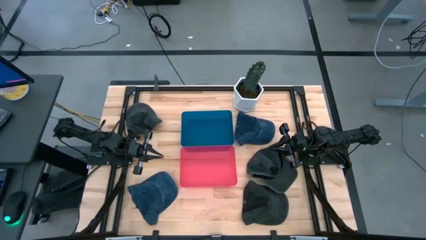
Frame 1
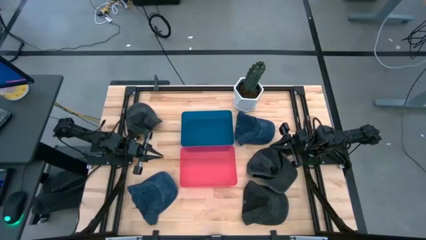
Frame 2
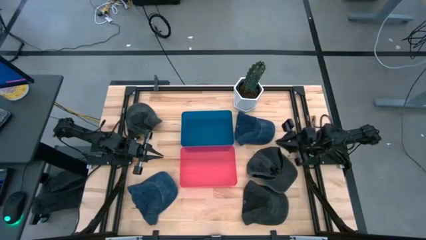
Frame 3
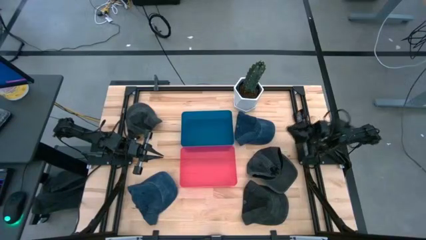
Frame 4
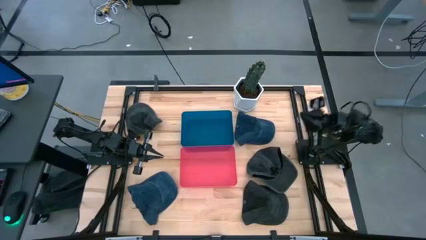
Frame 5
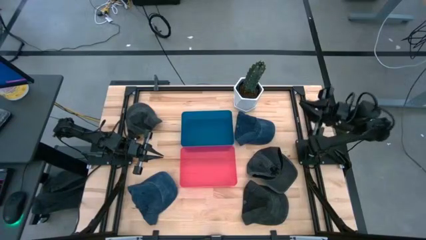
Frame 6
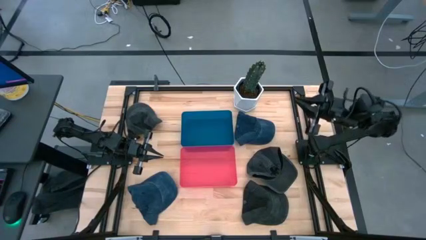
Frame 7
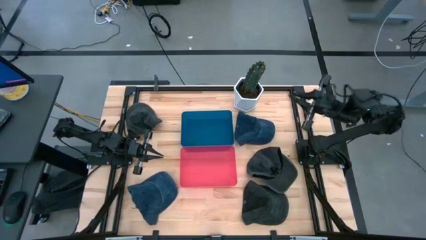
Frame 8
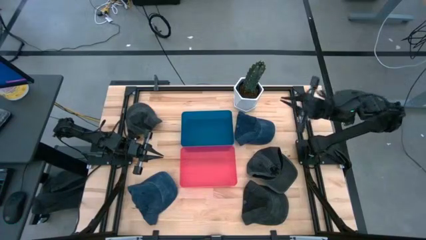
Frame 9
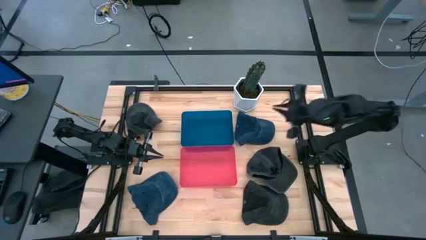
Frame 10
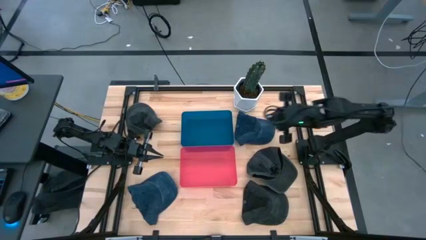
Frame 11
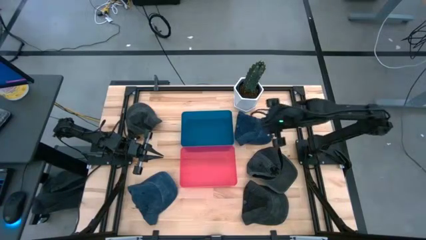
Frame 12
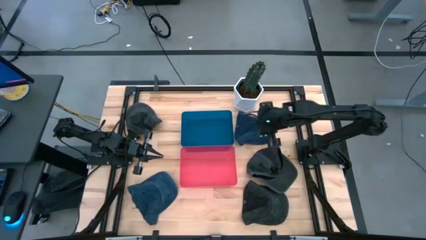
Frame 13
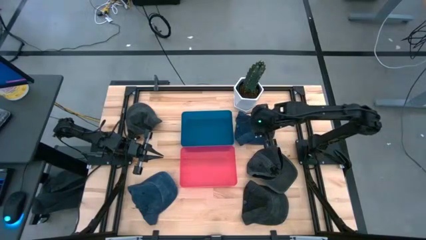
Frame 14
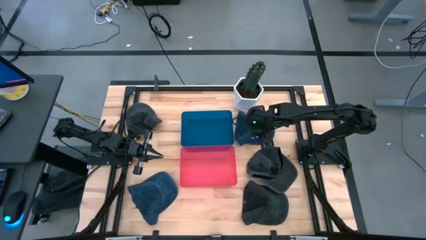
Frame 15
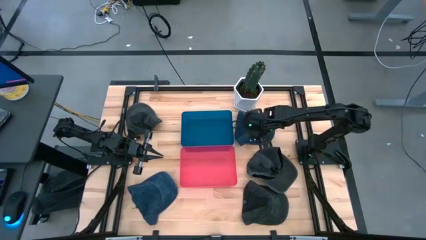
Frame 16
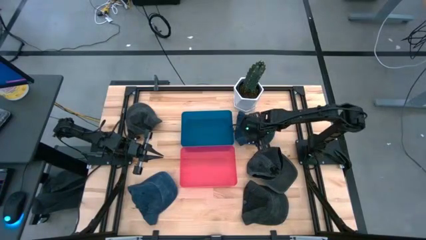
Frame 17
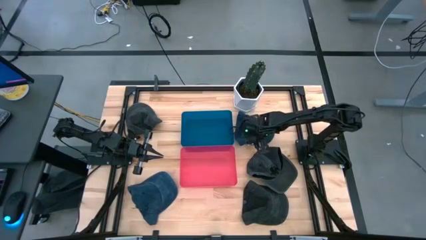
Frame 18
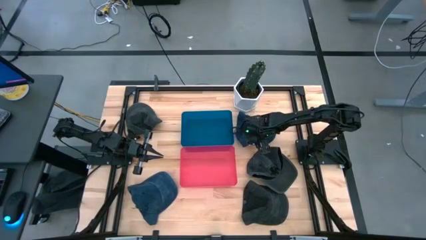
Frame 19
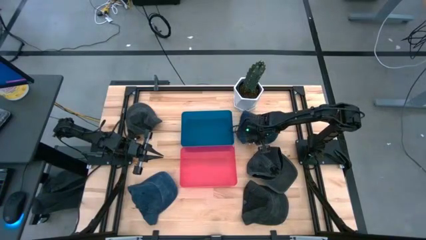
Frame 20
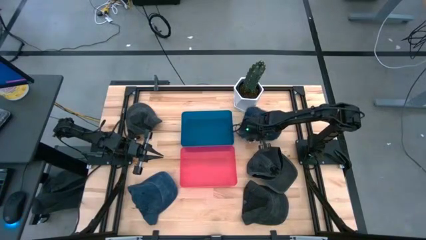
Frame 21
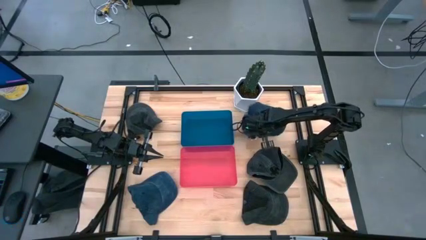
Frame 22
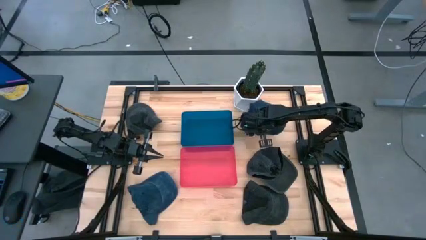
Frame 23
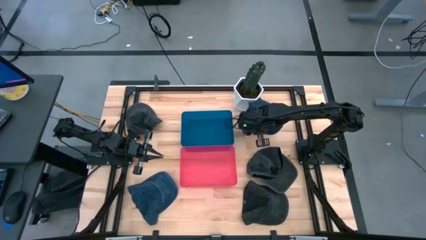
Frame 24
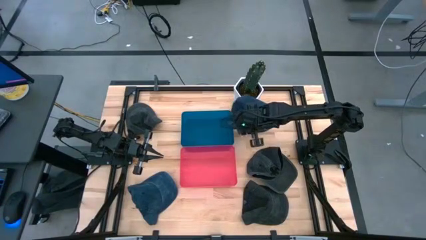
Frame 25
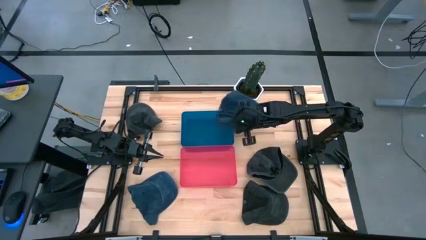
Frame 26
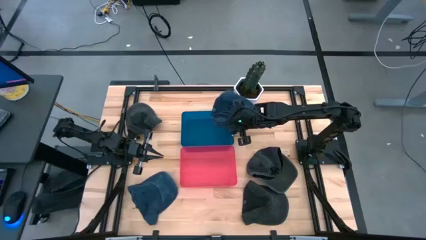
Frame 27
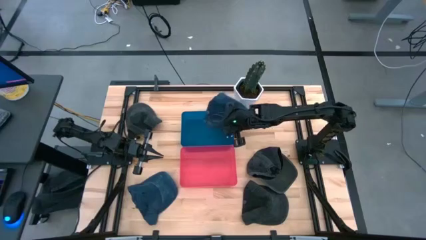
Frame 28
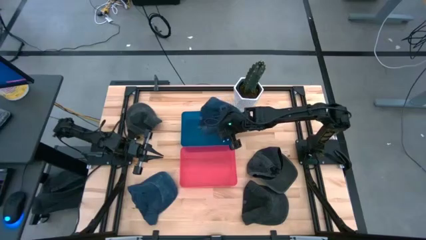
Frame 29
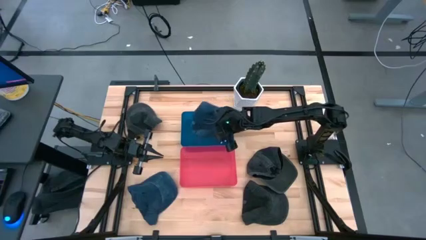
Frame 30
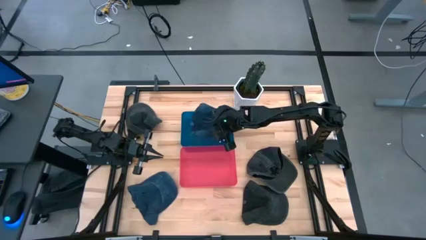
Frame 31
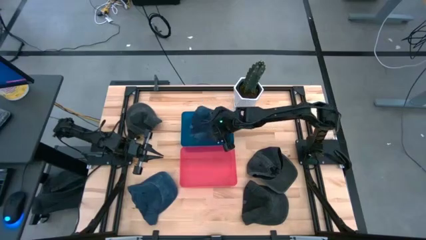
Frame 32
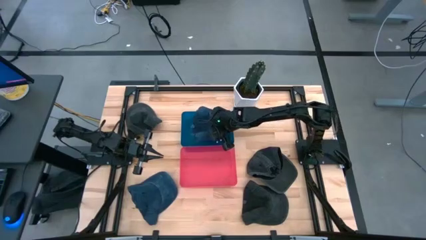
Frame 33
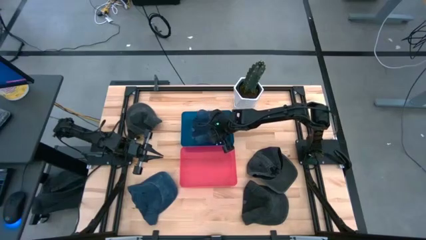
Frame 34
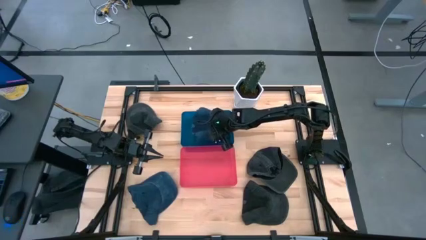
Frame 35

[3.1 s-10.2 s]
Task: Pick & Place hat
Put the top blue cap into the blue bin

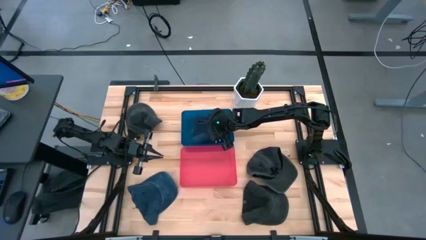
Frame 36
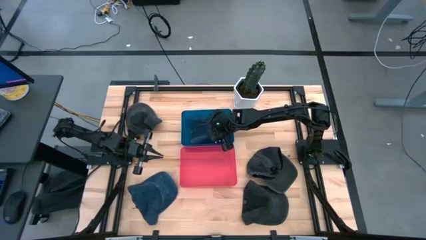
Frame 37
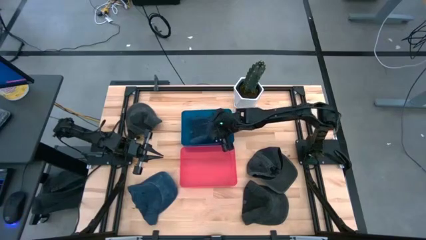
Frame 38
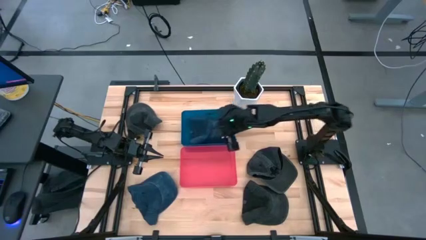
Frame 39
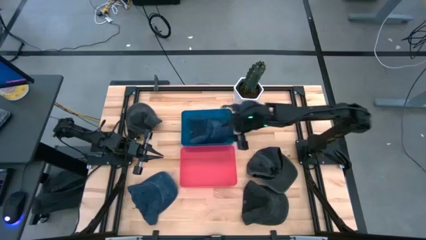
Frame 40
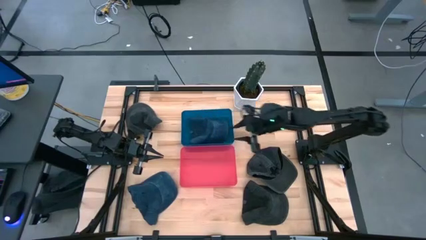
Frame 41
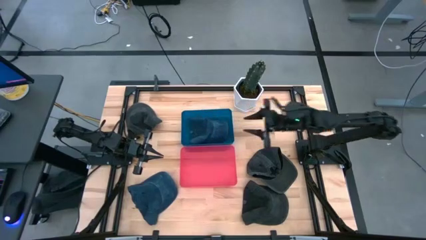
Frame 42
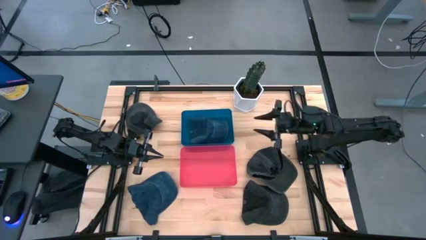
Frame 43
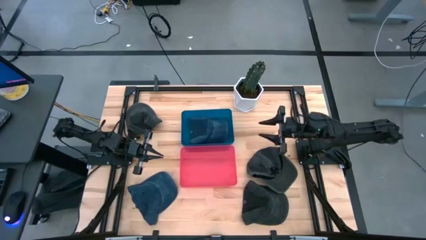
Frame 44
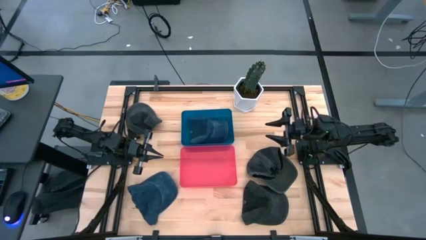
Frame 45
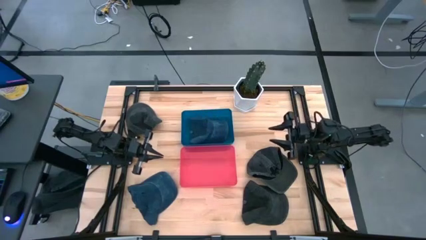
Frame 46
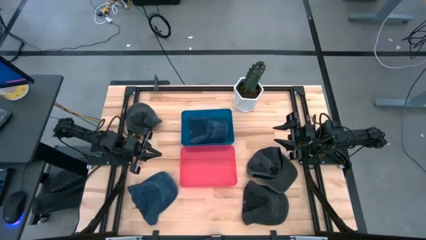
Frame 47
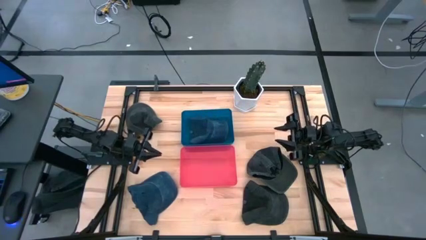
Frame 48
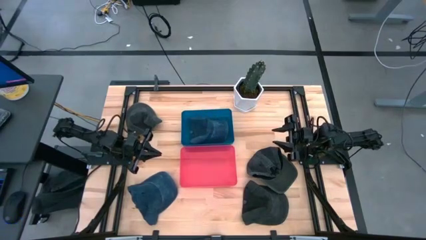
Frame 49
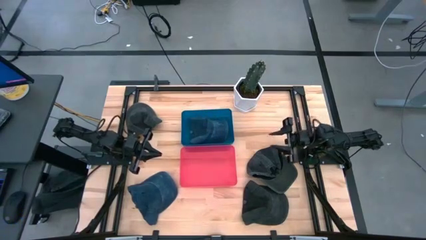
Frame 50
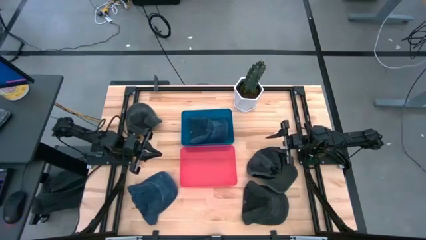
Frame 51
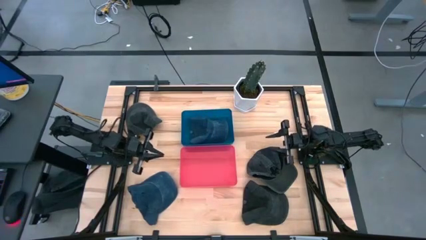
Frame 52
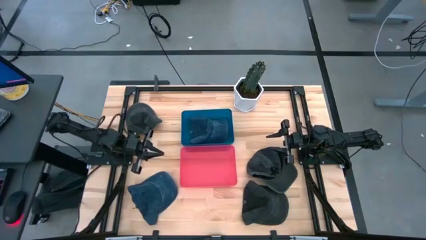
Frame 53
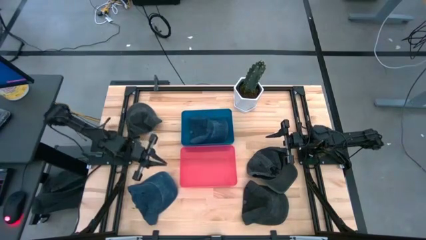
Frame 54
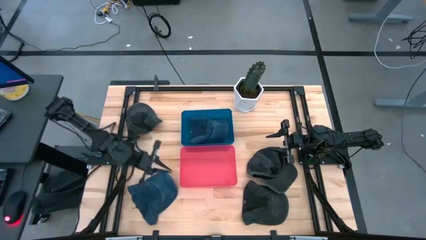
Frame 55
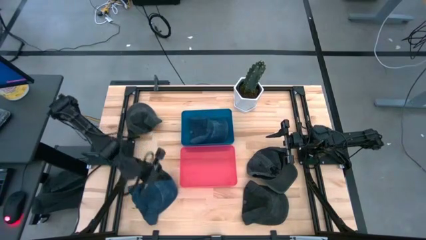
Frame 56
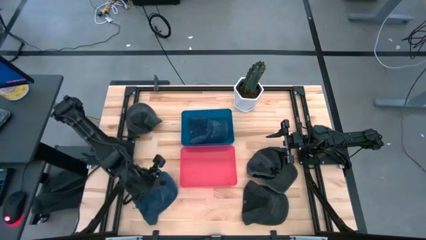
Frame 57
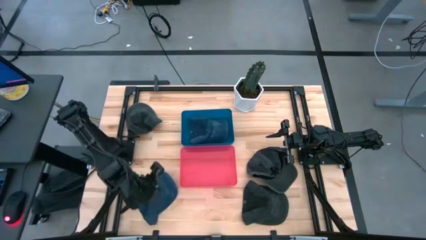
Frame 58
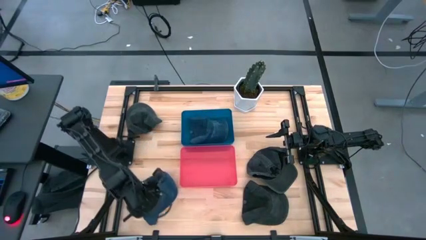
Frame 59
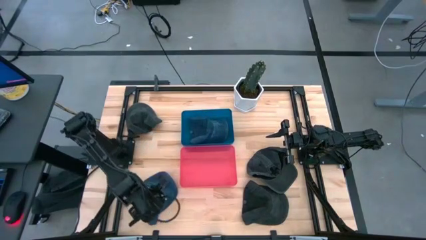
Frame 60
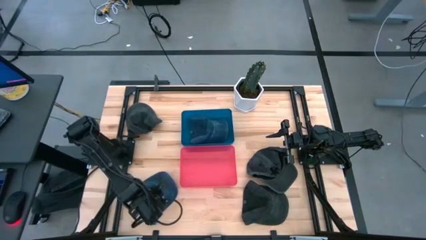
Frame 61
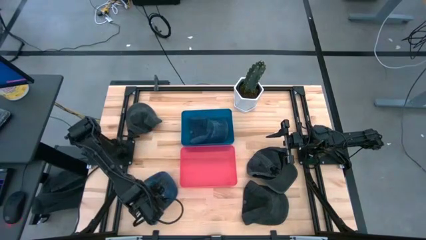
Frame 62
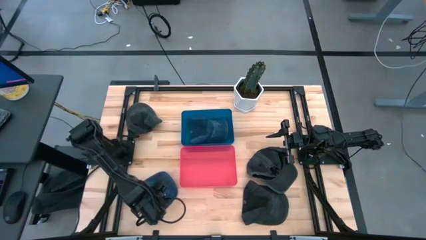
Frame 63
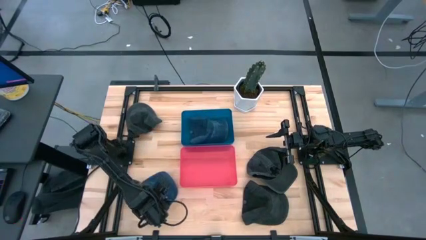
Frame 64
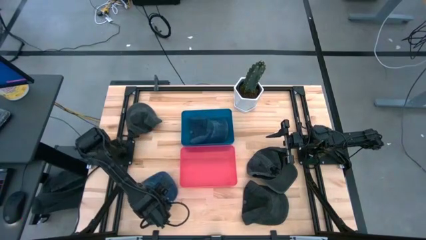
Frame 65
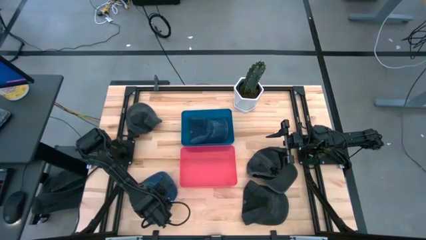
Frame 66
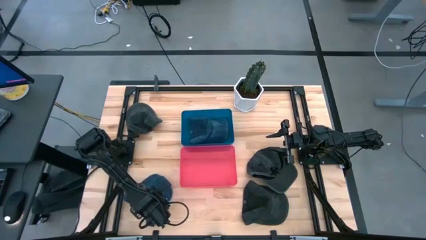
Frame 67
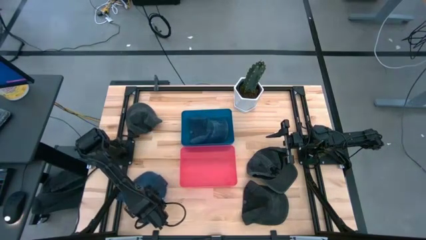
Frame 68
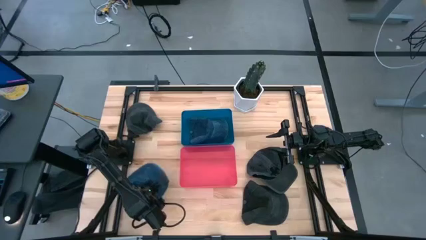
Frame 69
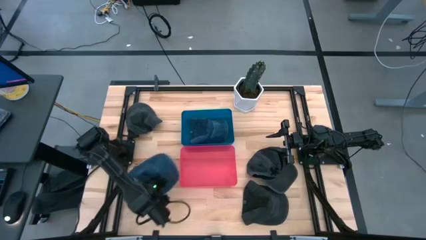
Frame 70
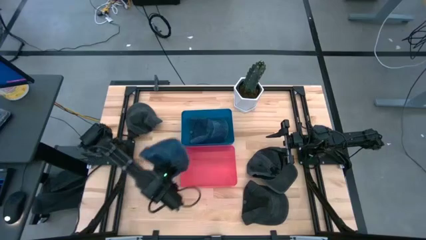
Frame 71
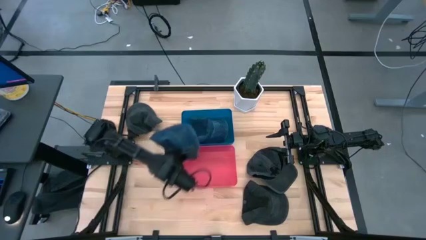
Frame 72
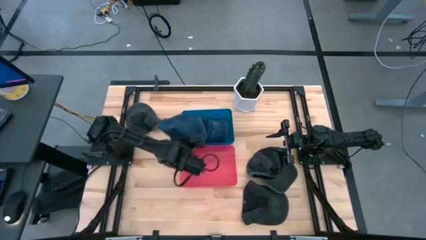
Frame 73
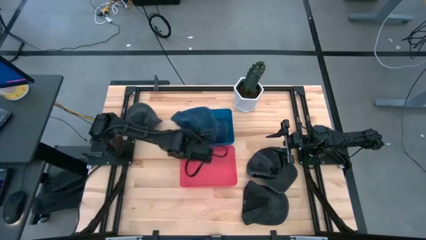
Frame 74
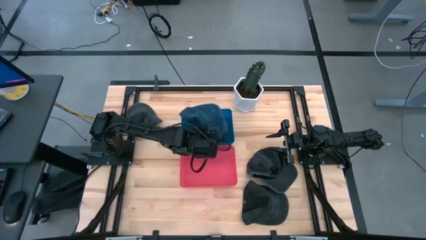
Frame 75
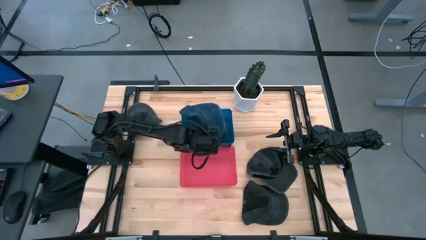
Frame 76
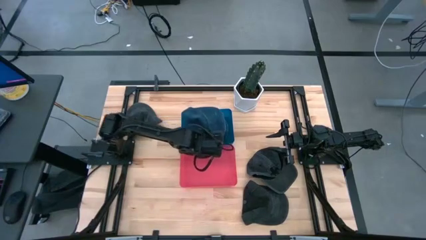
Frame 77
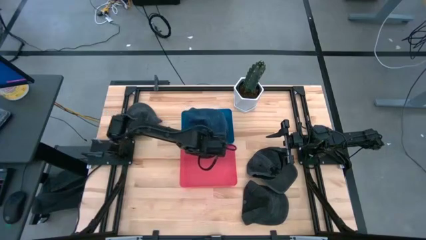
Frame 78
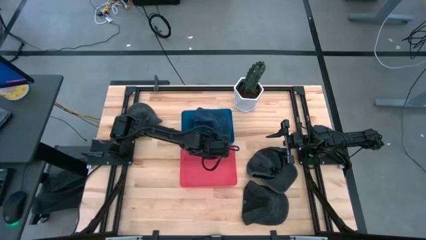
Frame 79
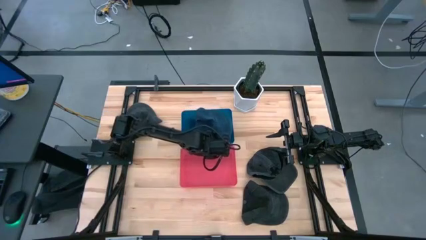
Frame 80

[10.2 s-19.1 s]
Put the blue cap into the blue bin
